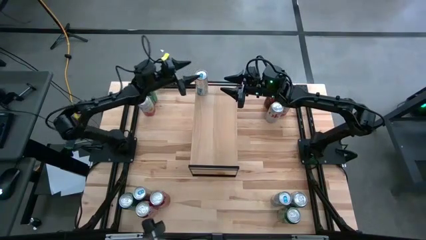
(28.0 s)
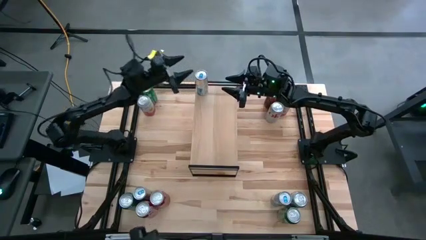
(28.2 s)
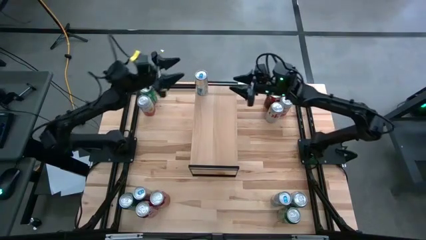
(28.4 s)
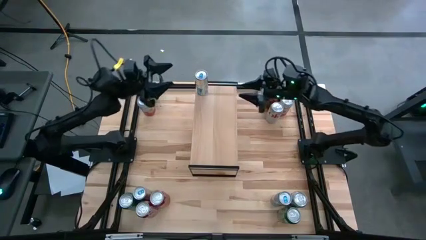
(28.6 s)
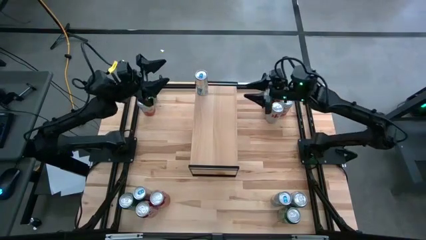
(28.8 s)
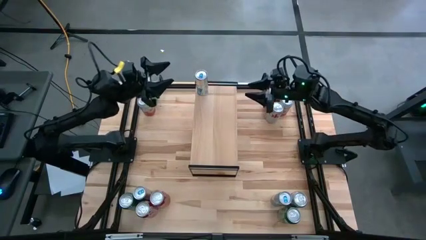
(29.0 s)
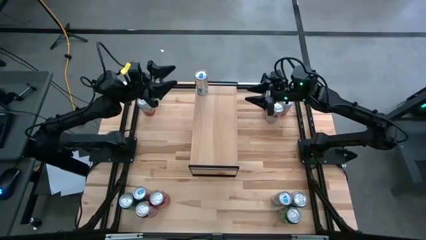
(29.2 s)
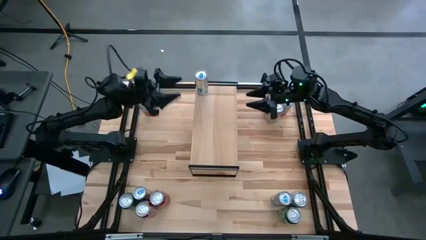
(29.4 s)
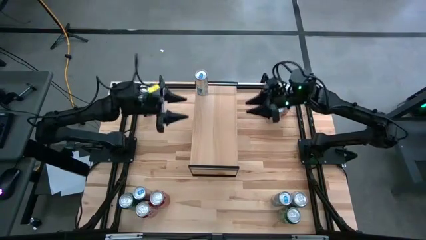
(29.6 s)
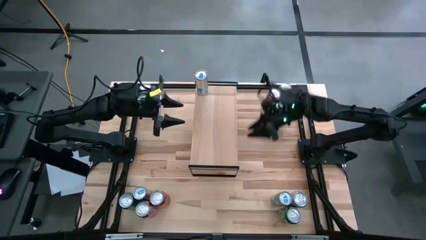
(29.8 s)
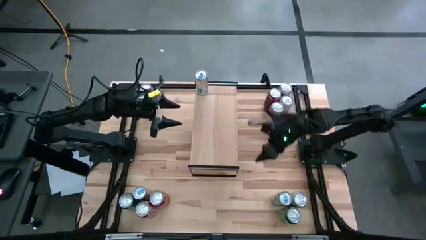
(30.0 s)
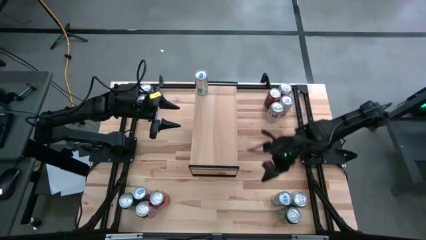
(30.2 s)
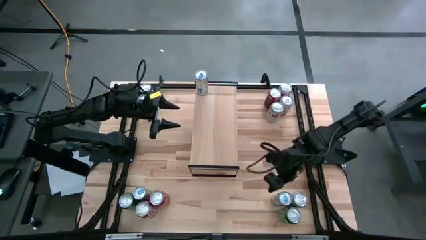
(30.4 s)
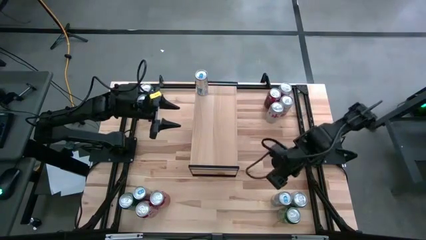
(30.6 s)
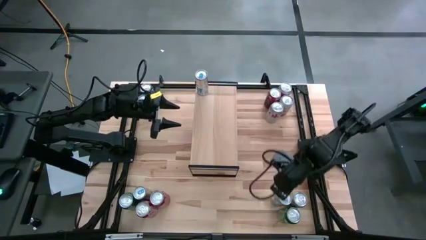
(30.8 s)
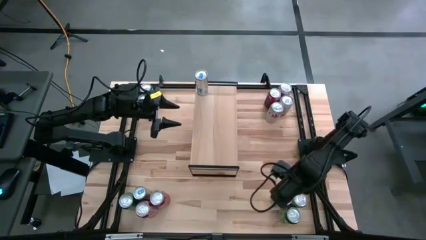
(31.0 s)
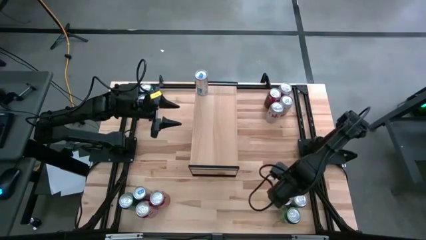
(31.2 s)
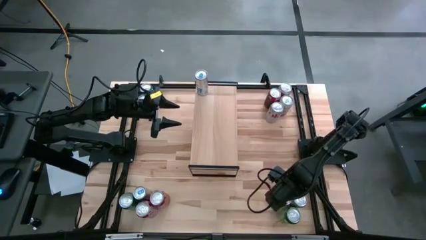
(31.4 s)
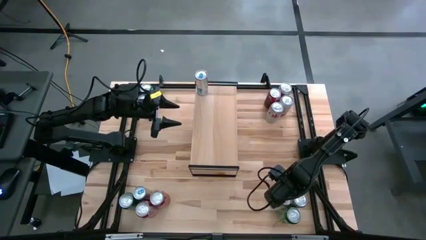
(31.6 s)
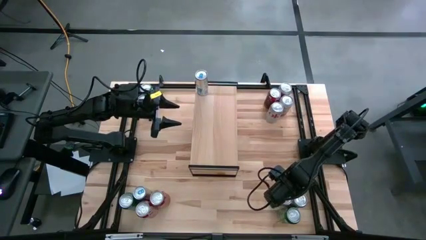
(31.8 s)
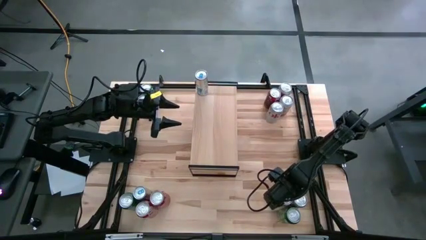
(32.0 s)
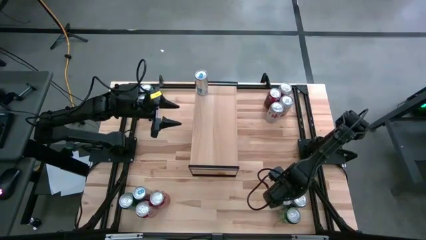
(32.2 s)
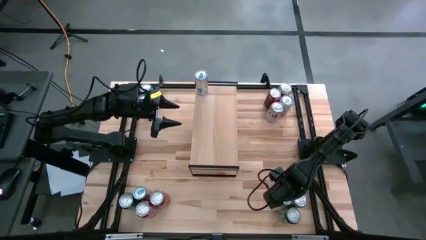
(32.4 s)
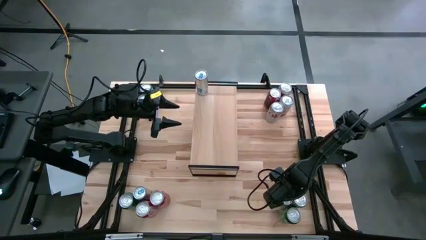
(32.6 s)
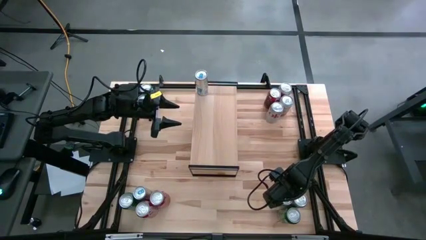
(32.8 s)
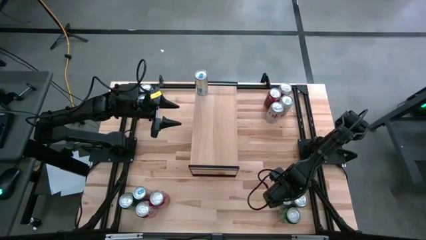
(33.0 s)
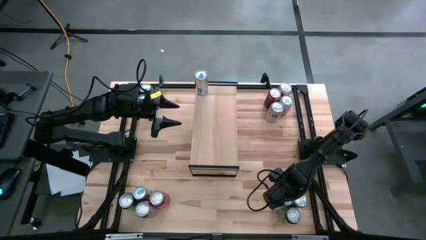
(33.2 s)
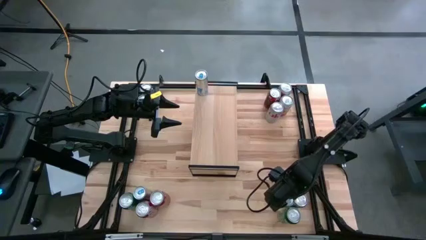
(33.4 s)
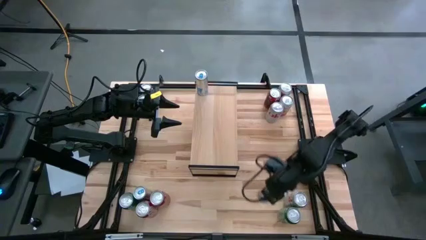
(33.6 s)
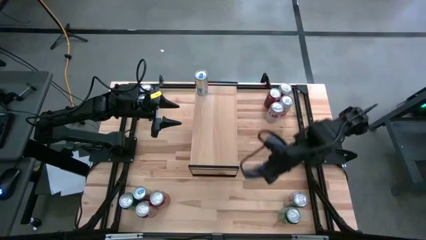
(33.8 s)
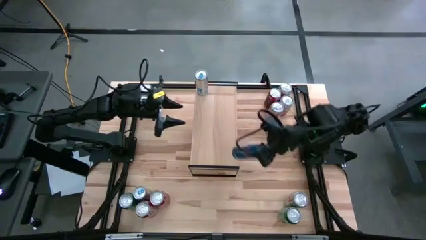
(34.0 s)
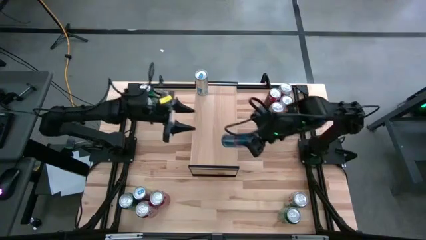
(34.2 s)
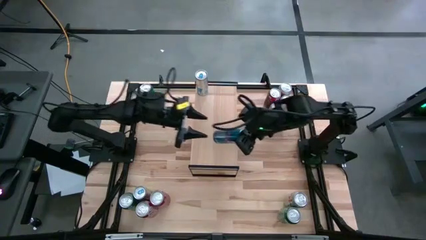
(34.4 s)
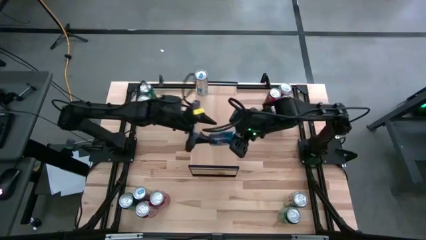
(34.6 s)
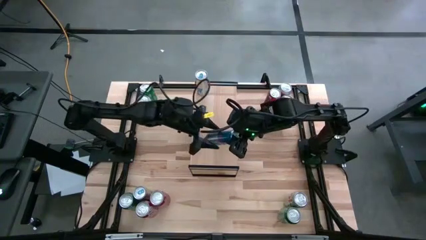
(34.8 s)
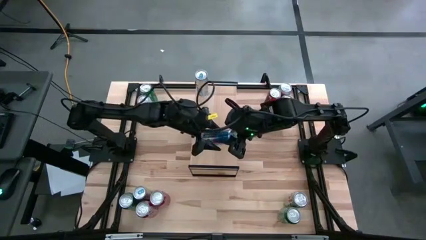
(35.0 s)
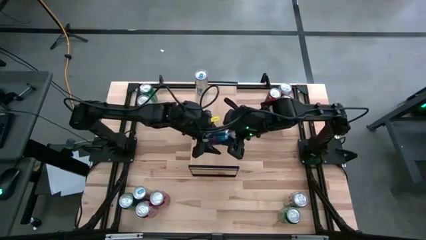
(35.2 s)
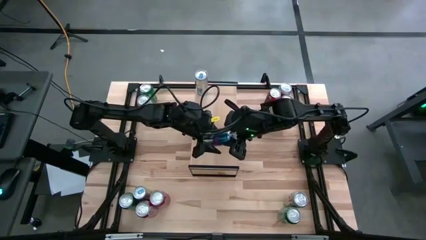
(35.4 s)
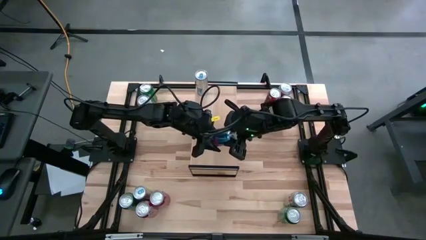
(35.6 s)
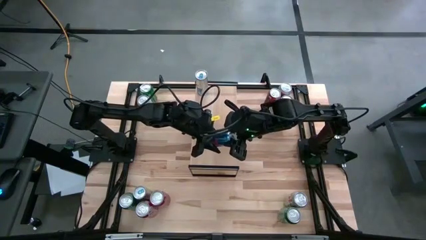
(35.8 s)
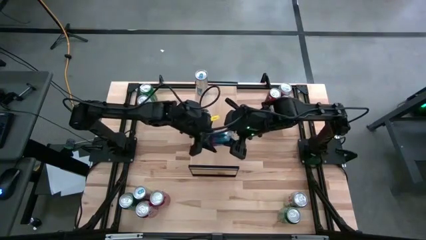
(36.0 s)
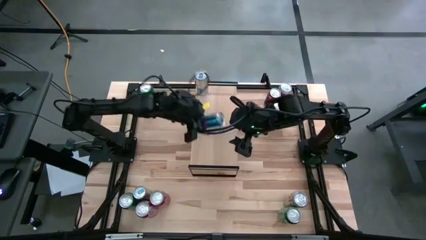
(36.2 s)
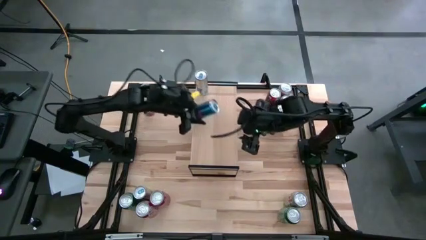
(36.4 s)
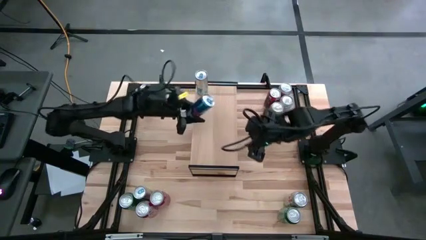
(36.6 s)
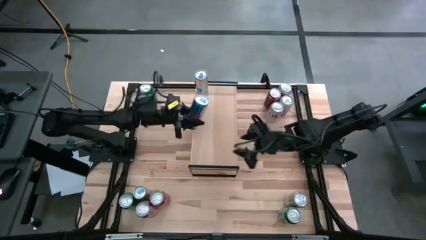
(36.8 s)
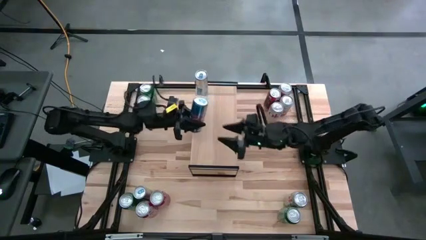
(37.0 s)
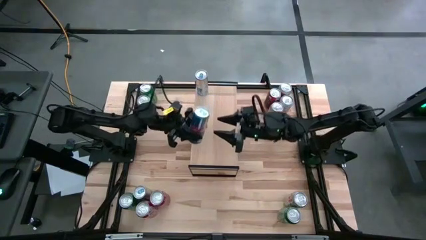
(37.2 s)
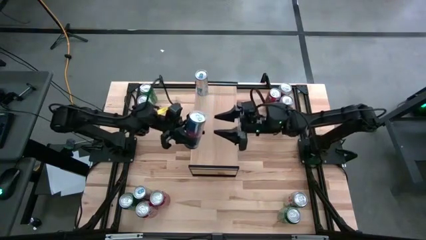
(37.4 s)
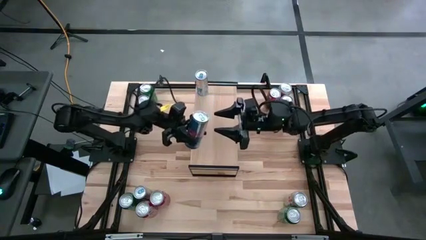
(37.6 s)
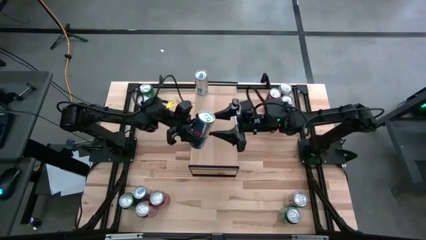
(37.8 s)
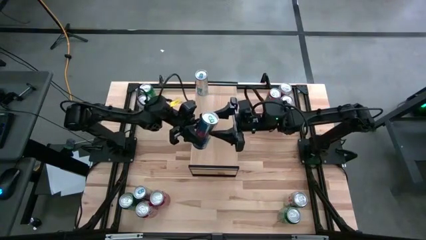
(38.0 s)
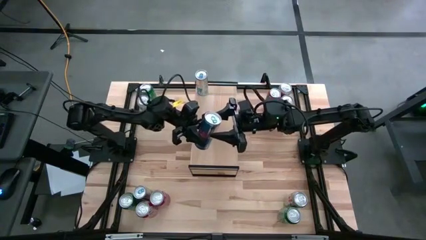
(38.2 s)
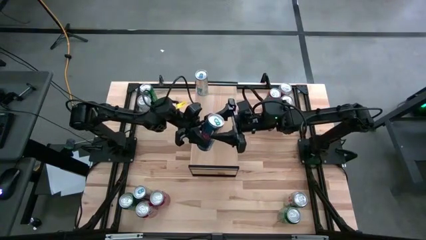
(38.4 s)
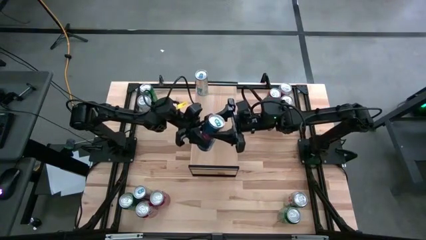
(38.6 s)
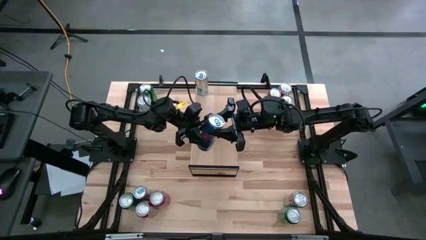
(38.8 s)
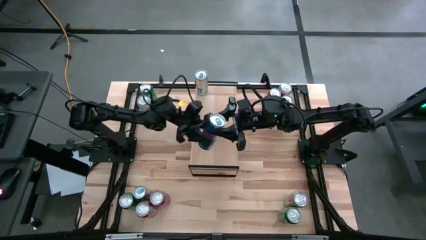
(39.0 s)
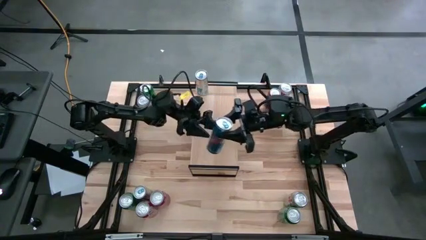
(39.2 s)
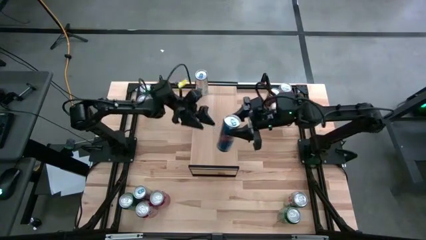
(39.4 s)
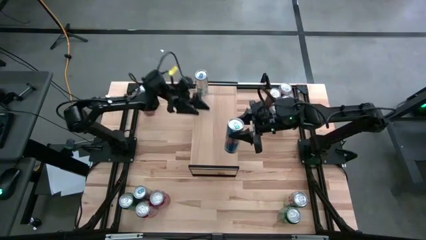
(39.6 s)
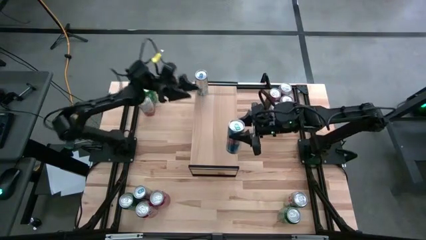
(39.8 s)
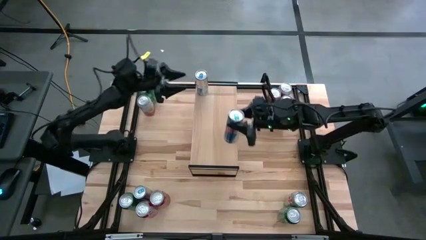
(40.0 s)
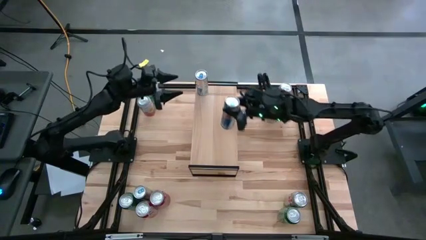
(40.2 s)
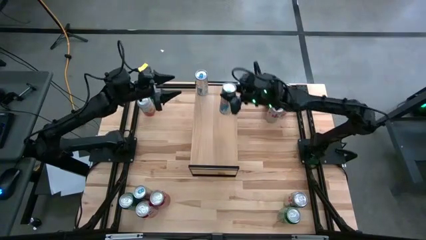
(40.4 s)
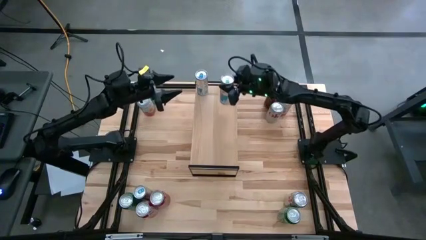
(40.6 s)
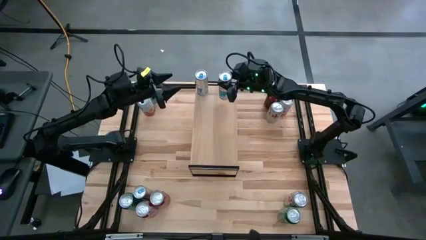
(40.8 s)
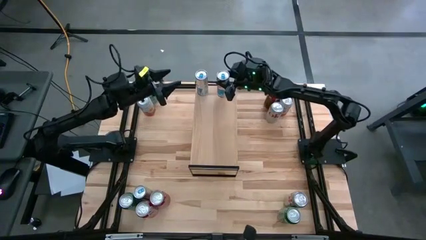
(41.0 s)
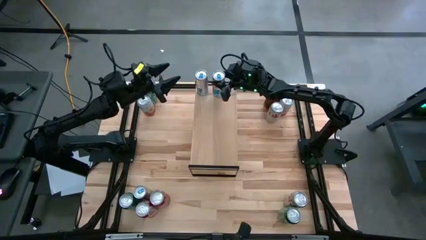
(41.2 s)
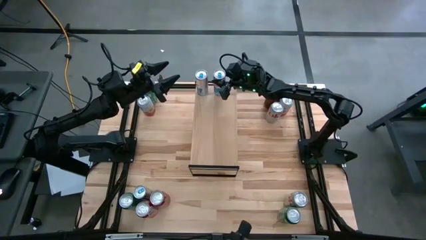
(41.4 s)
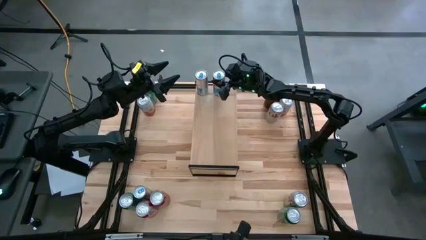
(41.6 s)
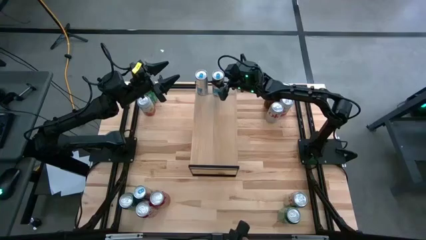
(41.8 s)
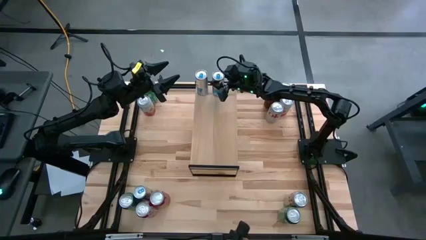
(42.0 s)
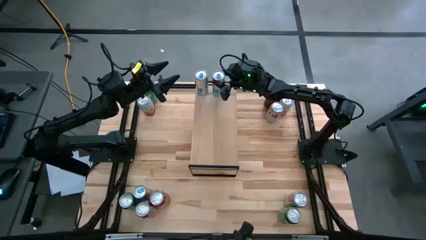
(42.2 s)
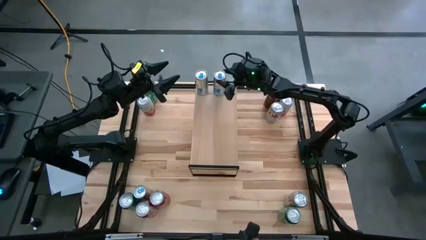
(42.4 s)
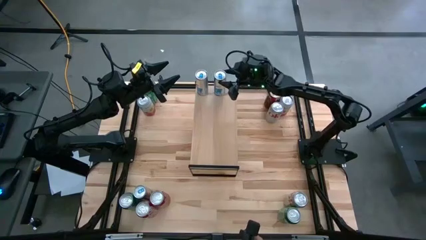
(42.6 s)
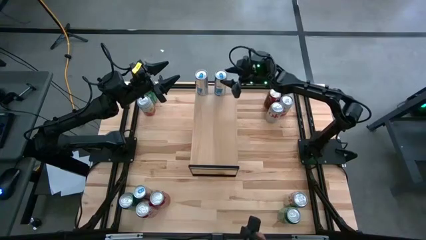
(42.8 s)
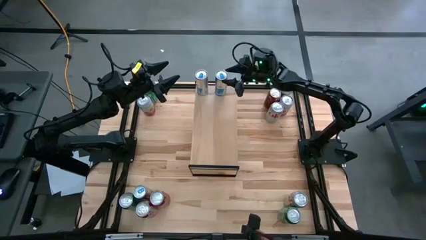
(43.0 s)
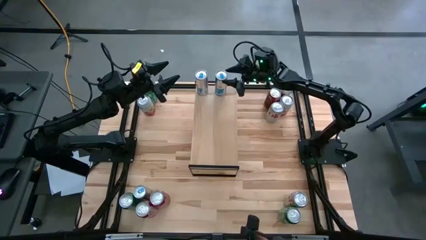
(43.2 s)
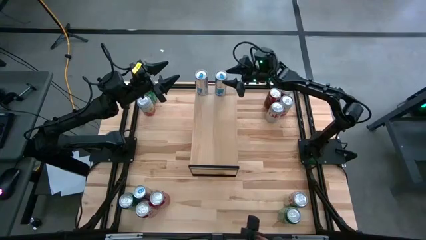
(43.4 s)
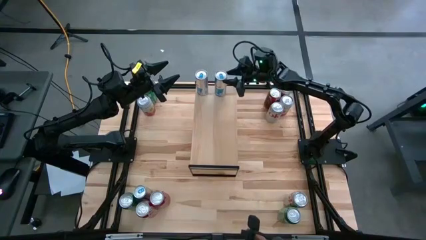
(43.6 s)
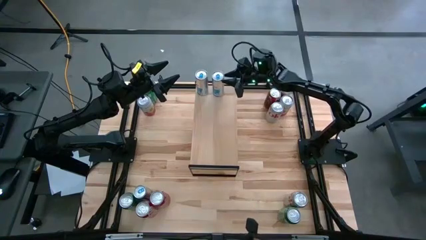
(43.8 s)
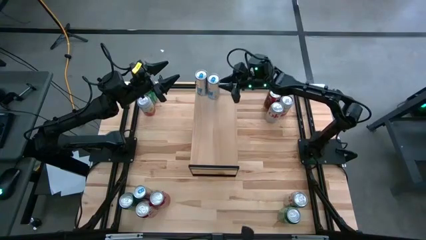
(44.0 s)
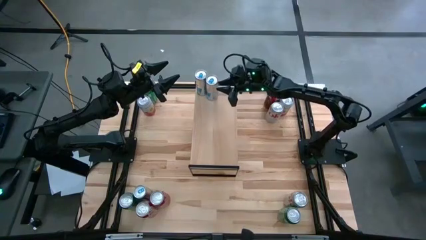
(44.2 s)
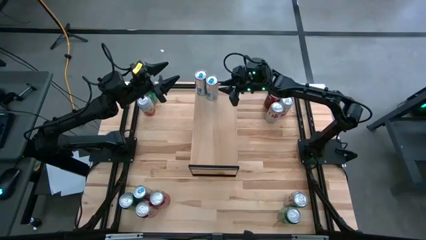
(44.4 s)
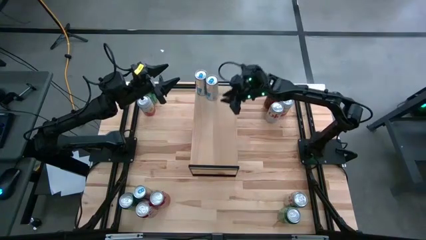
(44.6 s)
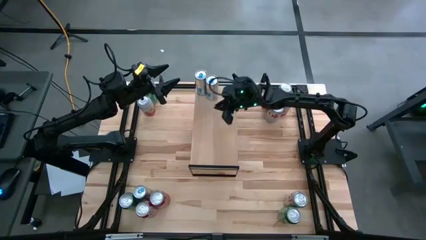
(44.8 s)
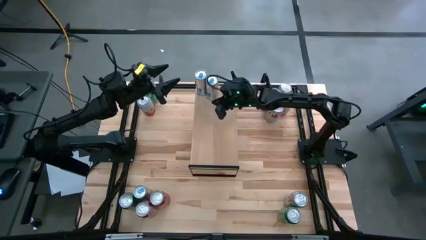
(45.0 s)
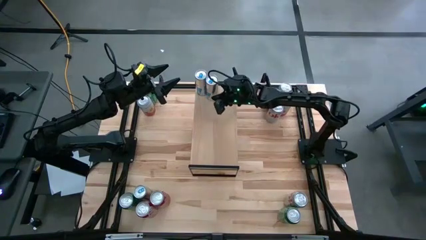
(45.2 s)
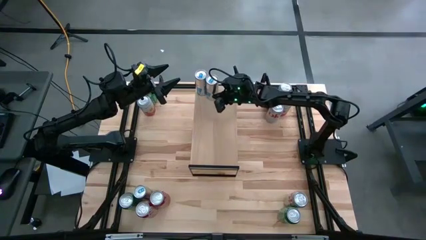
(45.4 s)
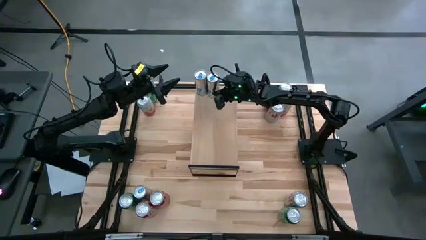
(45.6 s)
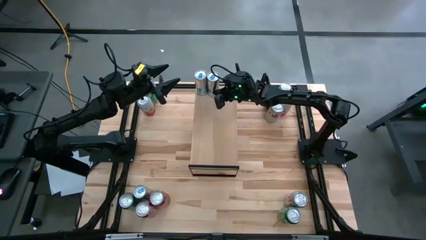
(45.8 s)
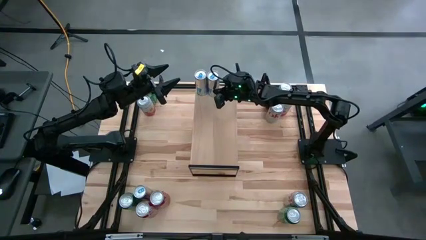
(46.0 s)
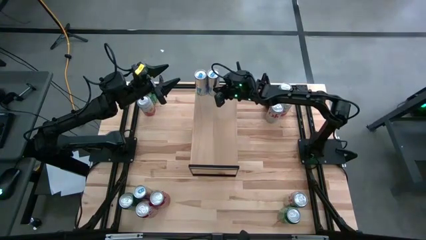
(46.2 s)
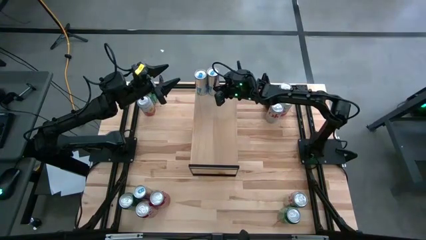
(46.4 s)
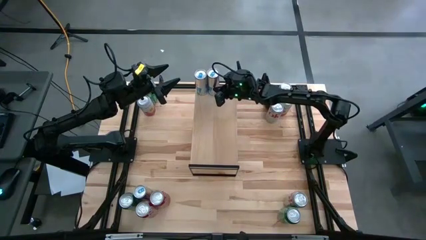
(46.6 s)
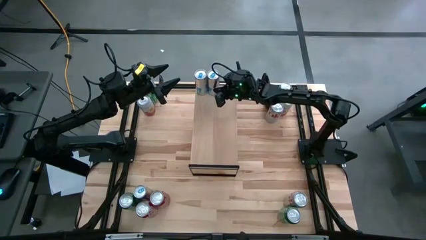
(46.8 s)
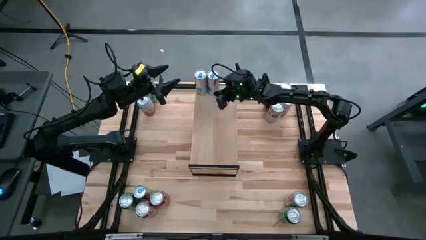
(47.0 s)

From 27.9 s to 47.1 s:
Task: Place canned beverage on shelf
Put the bottom right blue soda can on the shelf
